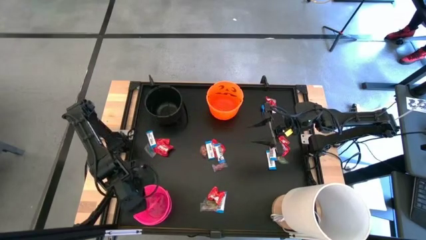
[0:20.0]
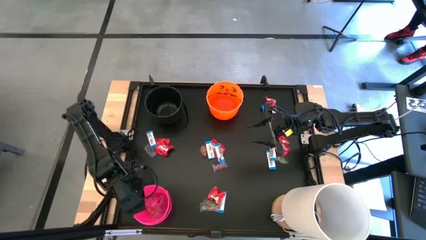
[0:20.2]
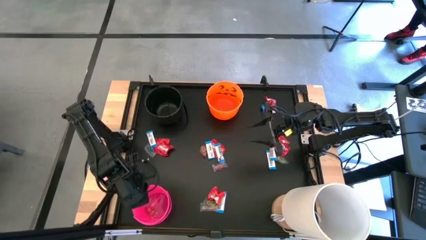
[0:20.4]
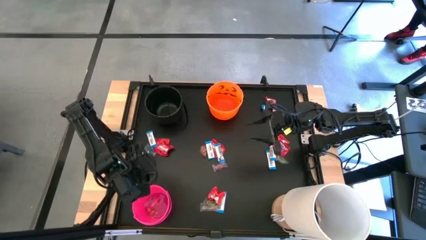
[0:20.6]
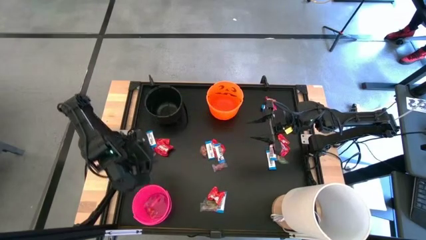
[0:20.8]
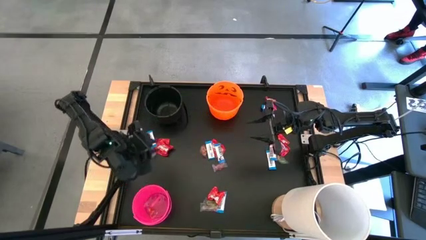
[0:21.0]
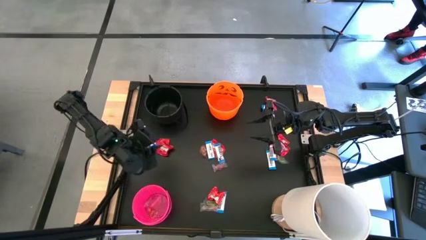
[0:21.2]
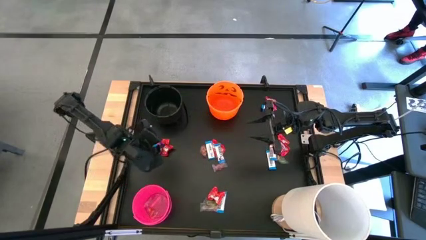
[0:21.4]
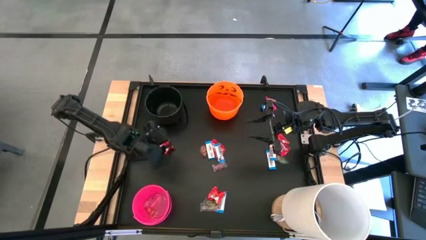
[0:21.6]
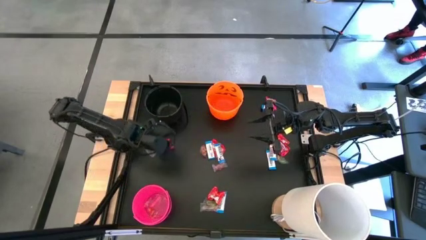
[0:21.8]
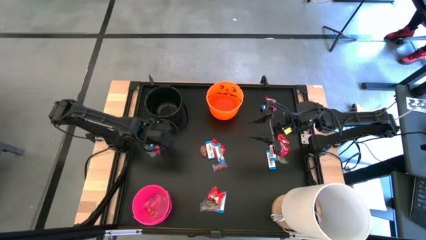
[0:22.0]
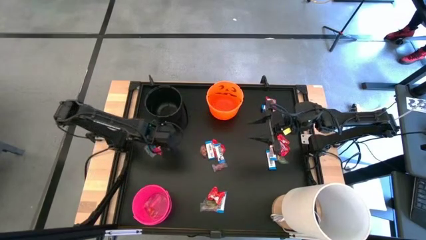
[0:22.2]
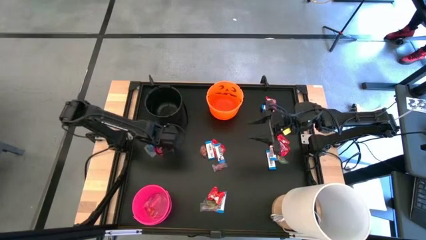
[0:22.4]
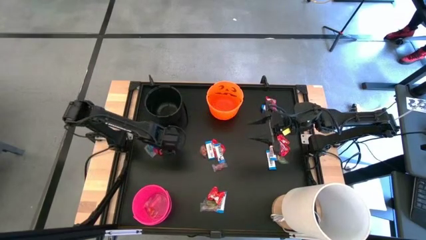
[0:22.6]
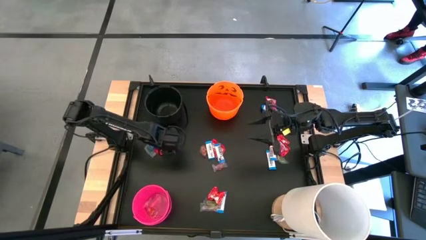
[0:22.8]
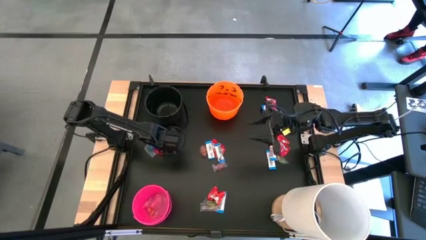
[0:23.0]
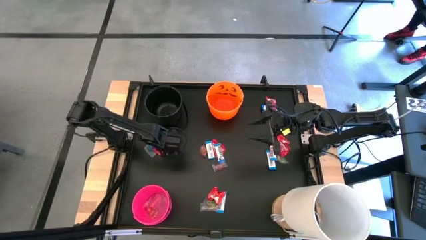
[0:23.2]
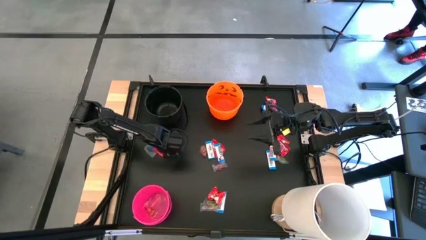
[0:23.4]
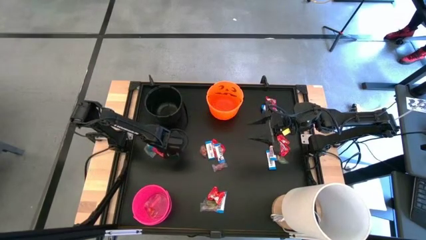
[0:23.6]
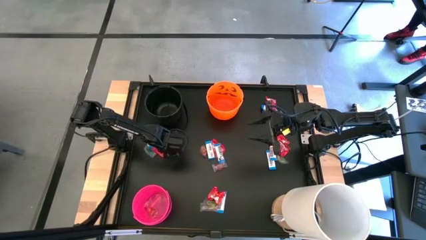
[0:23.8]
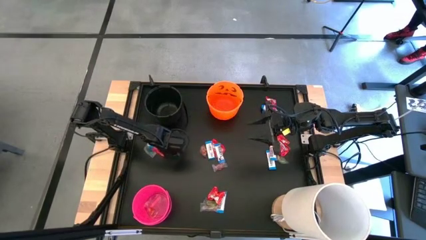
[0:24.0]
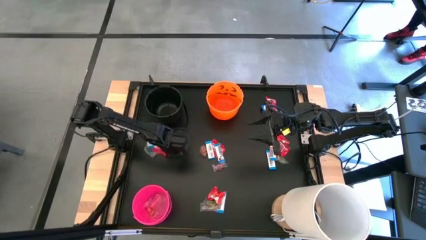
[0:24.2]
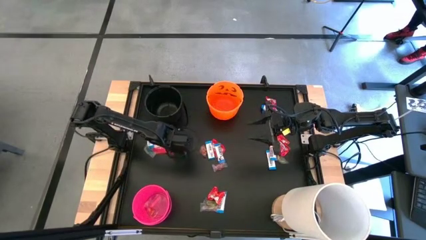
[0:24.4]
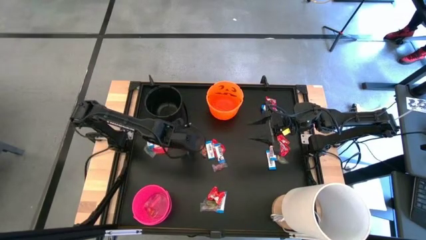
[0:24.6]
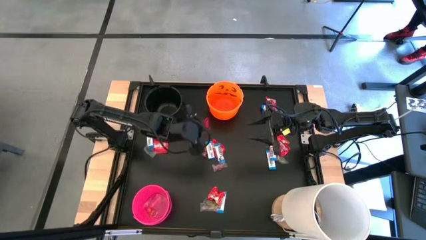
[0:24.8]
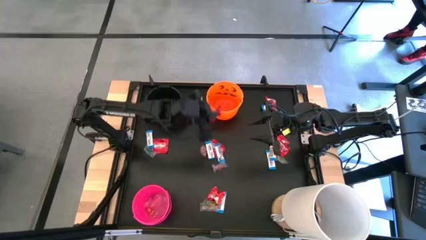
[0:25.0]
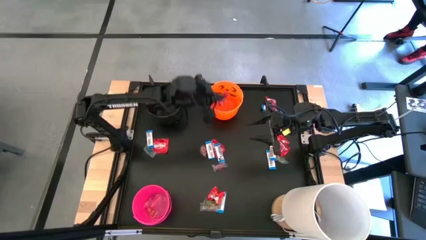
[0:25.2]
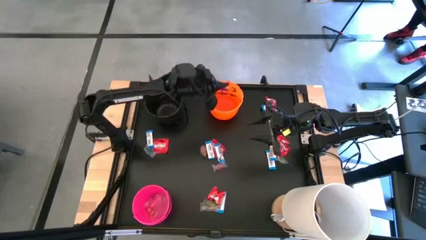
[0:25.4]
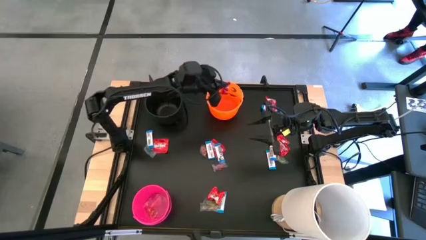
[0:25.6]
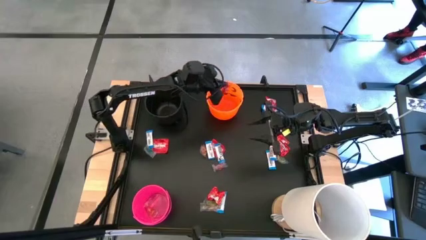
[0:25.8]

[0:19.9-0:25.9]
Task: Sort candy
Put the middle left red candy into the orange bin

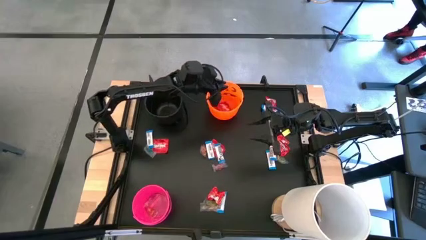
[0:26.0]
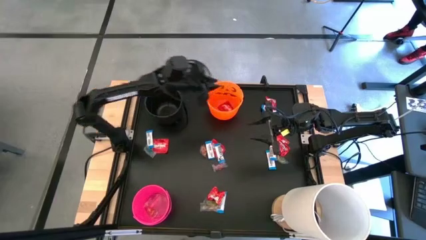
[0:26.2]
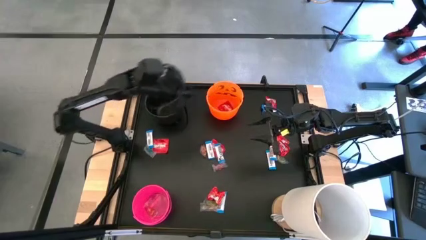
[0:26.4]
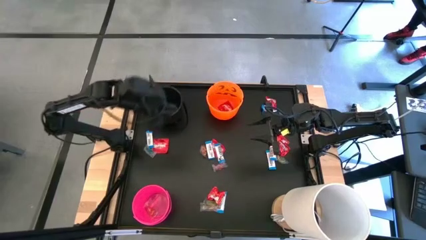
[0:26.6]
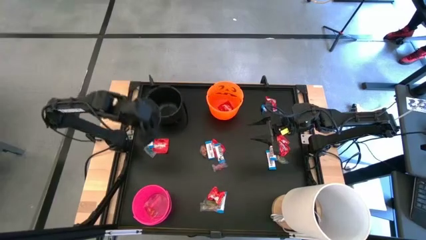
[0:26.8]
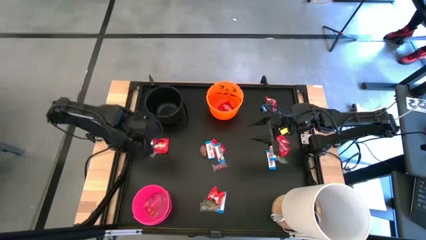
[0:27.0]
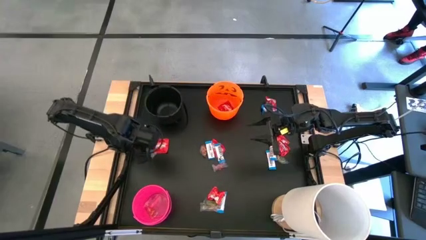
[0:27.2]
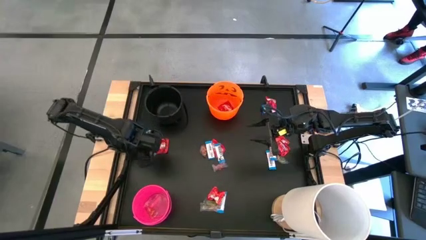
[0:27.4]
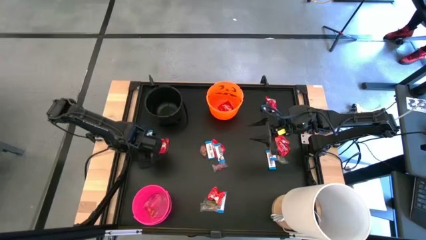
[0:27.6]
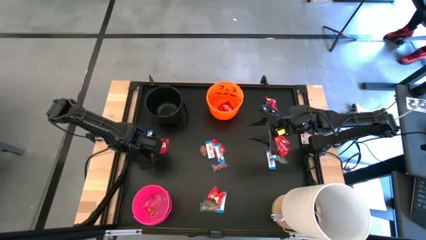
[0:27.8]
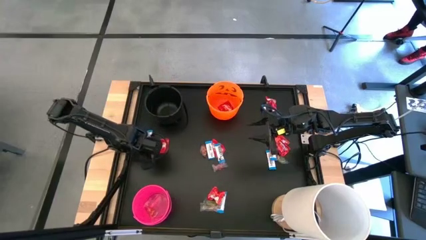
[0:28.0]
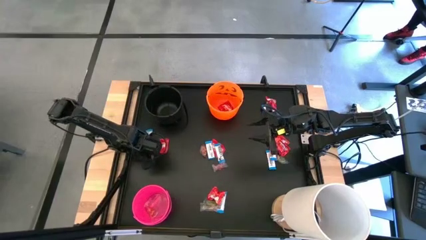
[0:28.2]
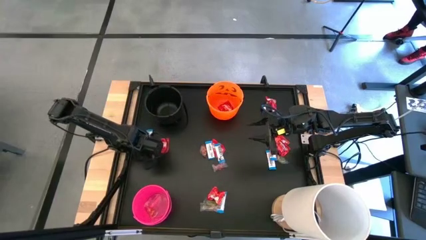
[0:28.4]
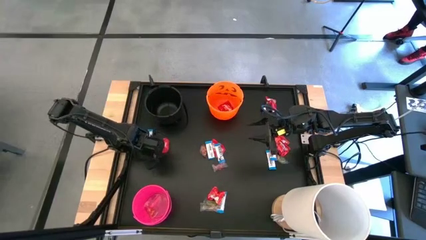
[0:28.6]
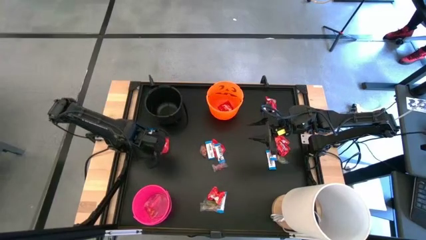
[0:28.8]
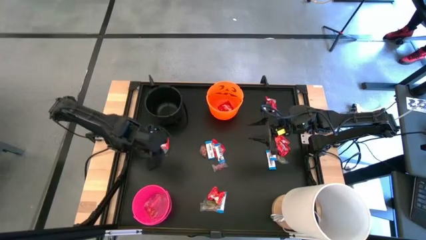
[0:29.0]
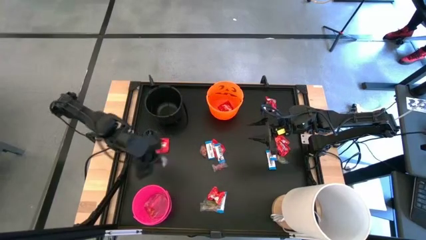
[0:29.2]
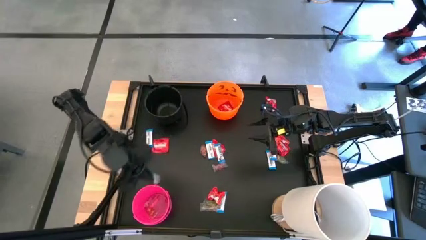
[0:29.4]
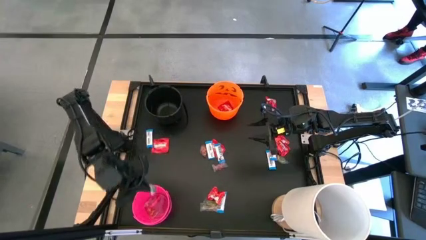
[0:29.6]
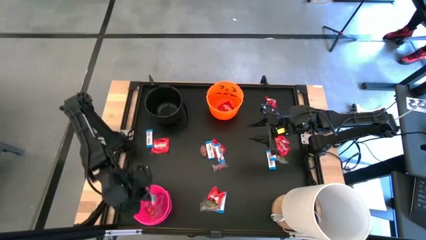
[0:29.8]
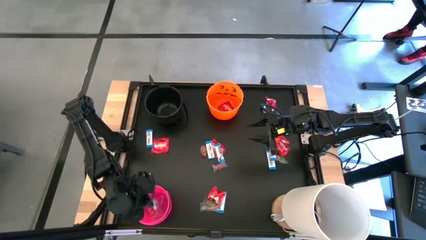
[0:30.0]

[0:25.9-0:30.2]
Put the middle left transparent candy into the pink bin

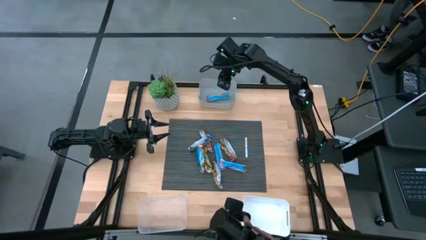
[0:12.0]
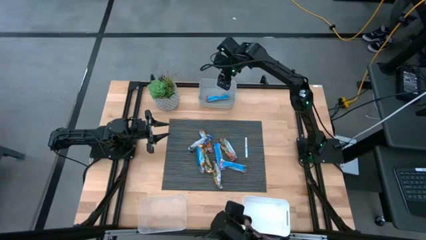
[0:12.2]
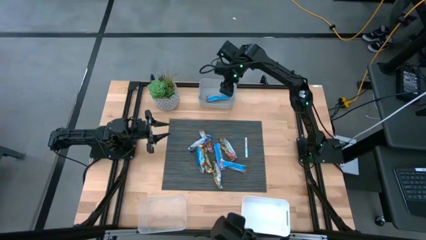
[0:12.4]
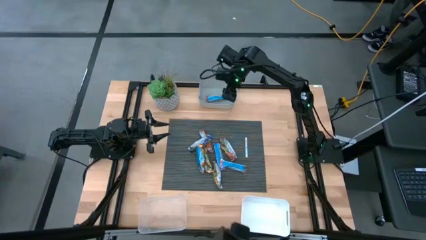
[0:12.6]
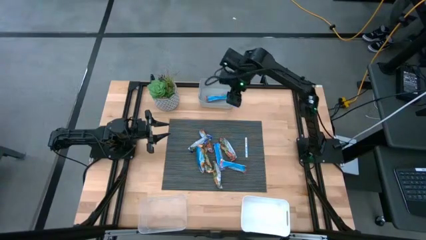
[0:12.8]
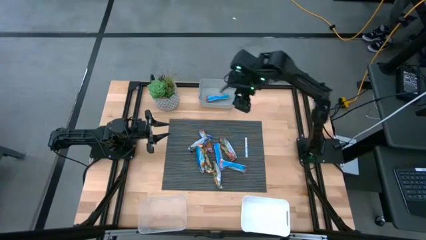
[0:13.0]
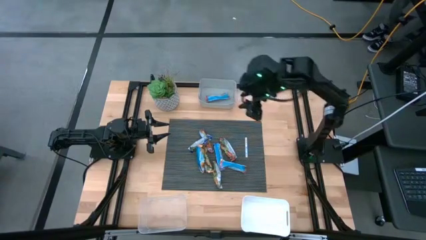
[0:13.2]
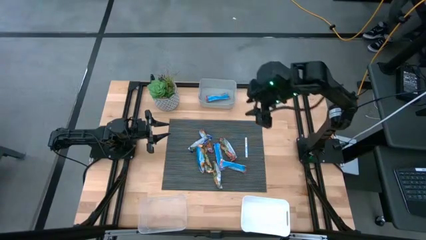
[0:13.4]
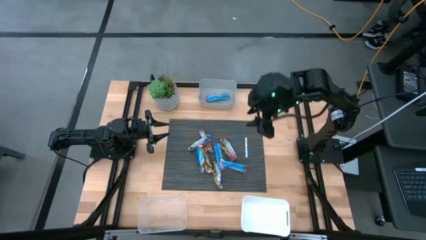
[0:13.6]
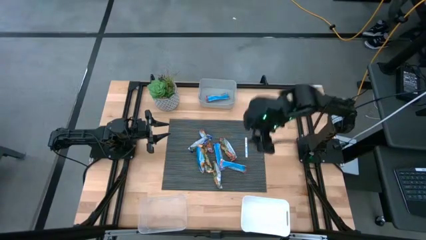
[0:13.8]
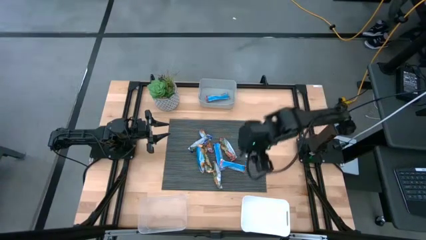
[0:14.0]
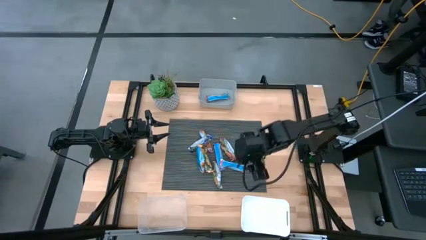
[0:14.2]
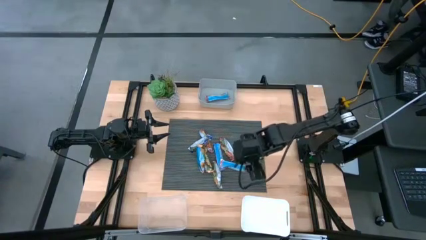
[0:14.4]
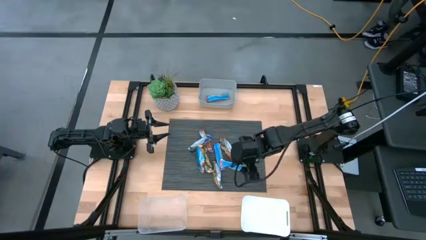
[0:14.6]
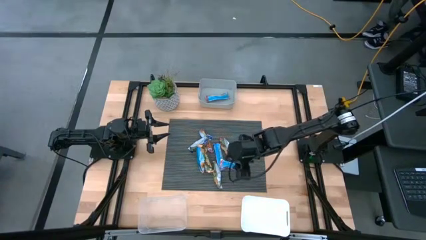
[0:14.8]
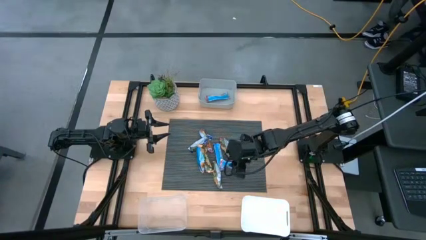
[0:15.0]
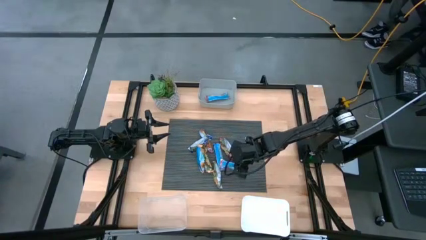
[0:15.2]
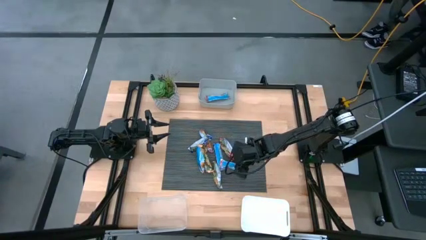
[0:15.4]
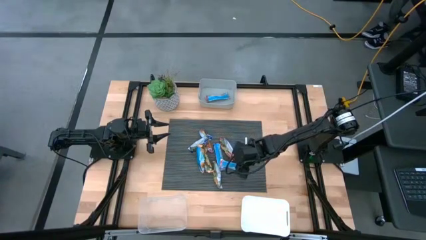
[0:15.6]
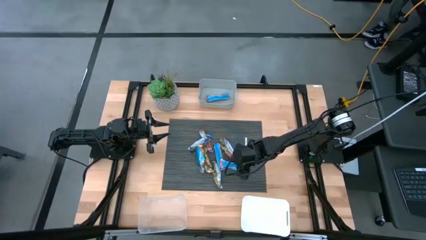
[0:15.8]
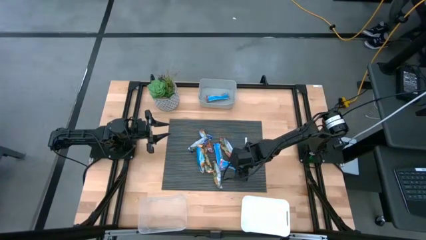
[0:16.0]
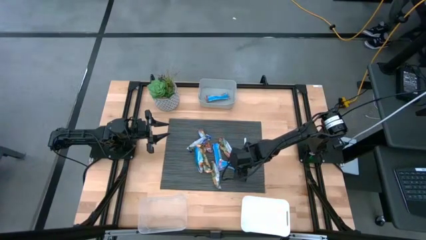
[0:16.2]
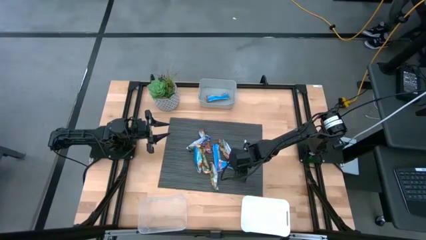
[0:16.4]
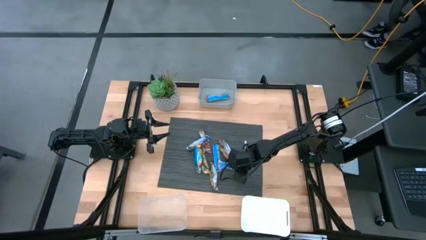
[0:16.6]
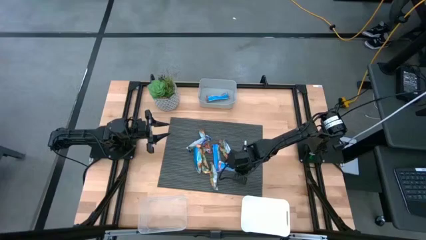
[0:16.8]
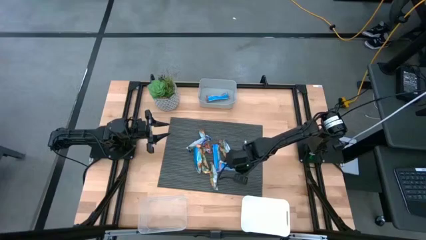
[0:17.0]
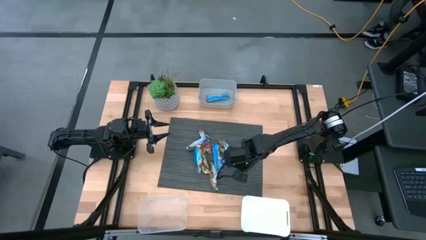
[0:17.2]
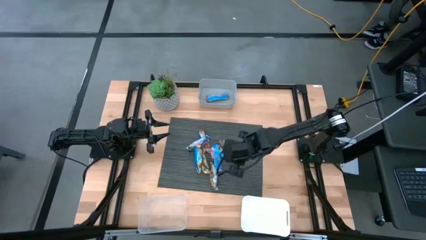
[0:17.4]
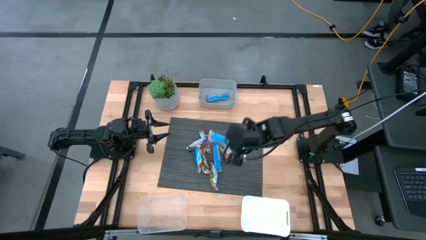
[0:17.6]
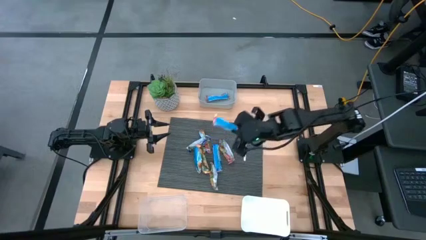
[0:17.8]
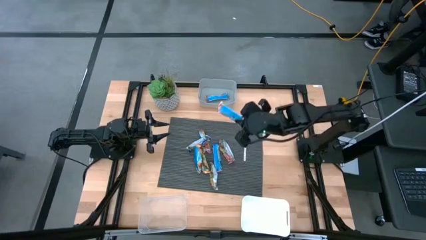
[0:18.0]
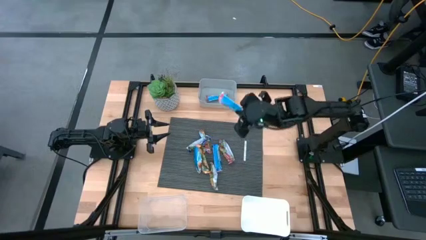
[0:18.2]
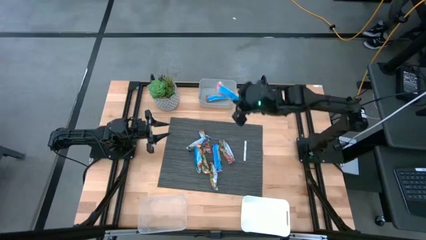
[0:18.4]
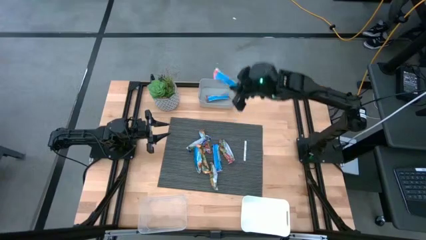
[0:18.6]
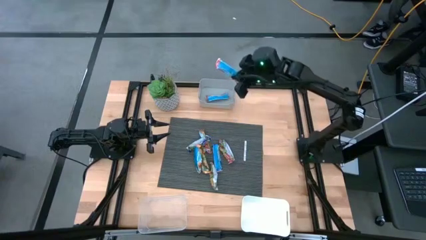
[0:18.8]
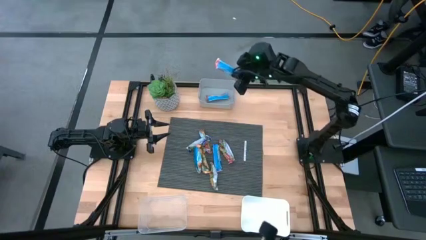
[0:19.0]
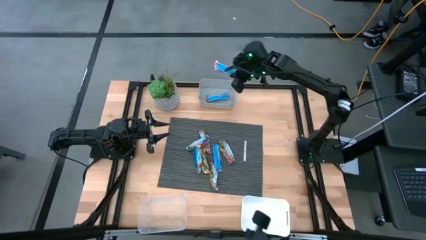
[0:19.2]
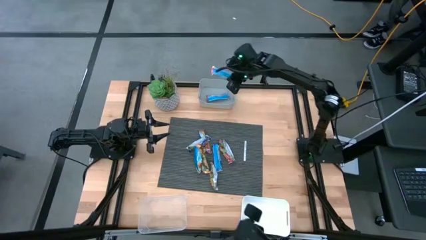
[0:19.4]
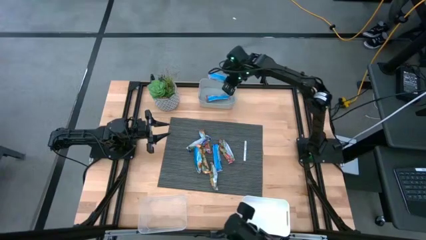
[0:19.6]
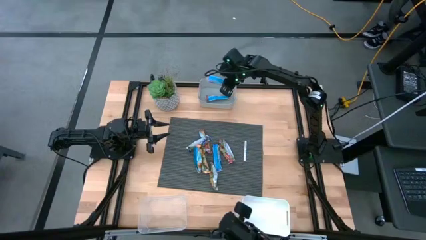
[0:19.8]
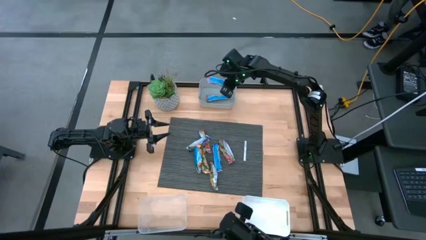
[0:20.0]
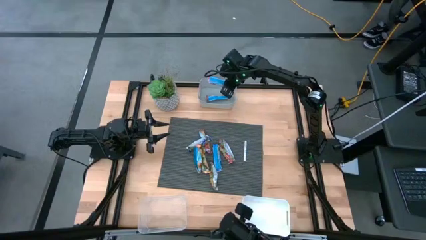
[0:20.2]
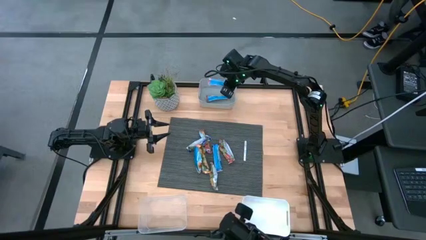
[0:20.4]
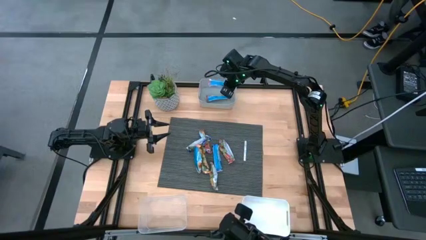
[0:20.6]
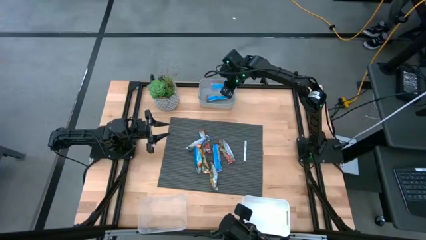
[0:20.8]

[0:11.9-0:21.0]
Task: Pick and place Granola Bars by type
Put the red granola bar into the gray bin
